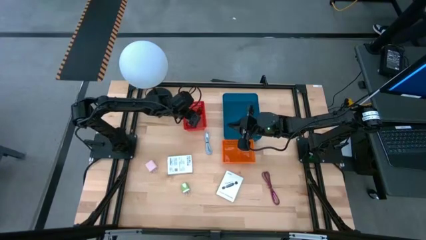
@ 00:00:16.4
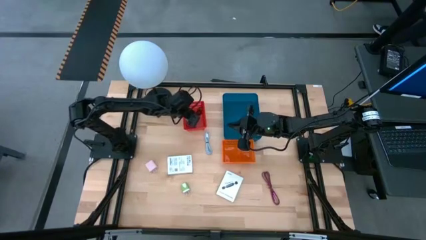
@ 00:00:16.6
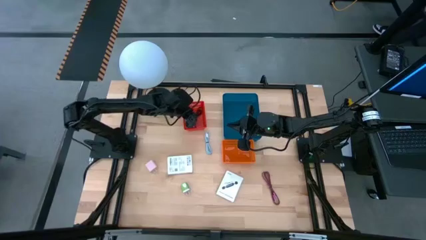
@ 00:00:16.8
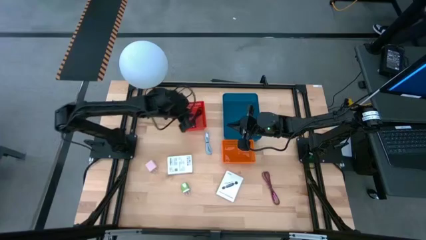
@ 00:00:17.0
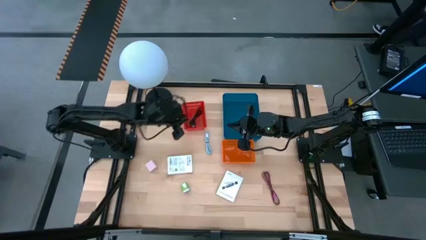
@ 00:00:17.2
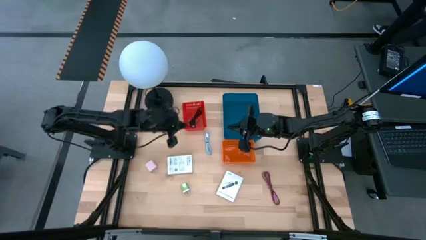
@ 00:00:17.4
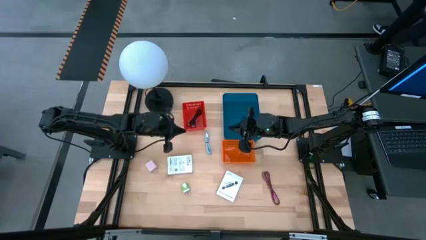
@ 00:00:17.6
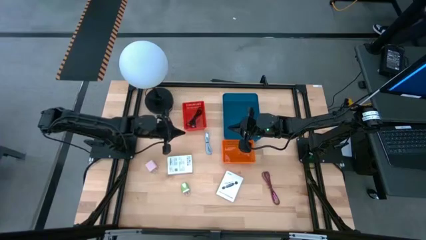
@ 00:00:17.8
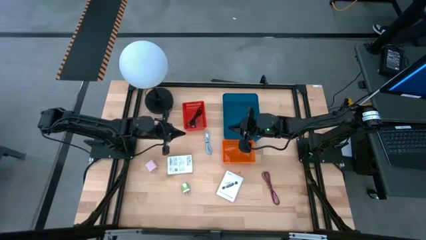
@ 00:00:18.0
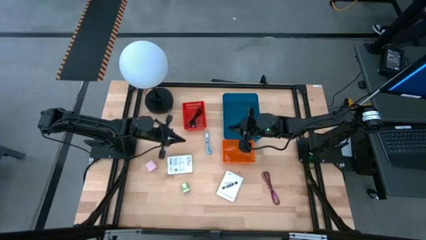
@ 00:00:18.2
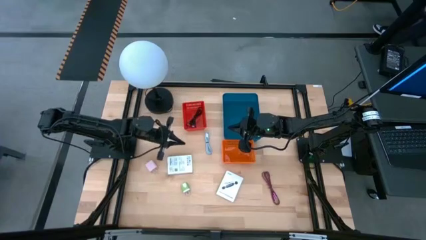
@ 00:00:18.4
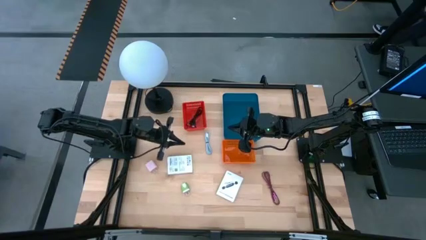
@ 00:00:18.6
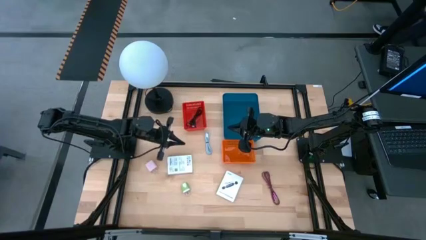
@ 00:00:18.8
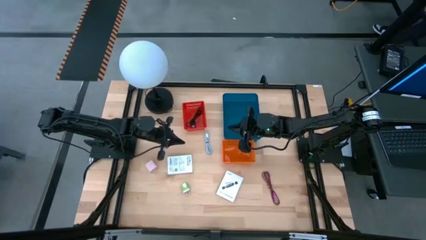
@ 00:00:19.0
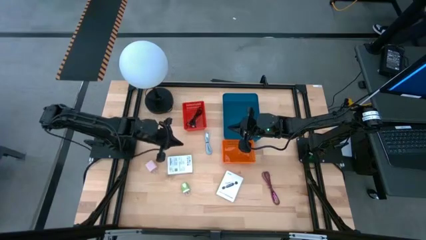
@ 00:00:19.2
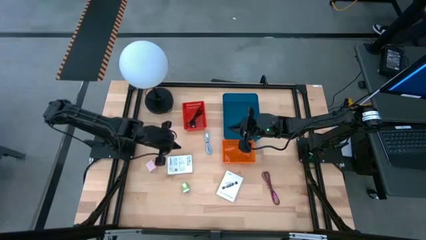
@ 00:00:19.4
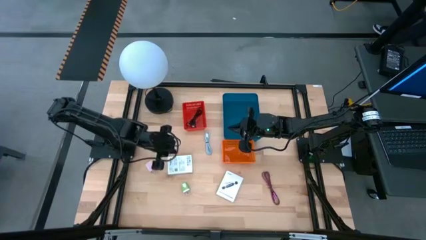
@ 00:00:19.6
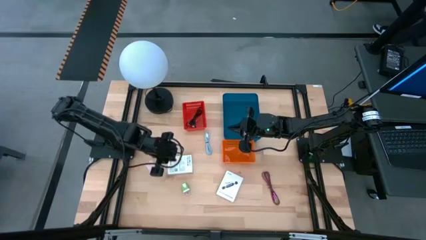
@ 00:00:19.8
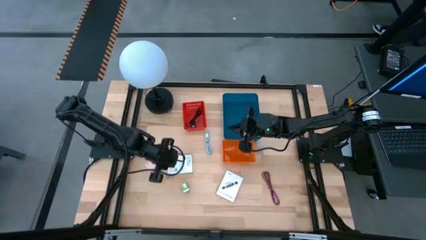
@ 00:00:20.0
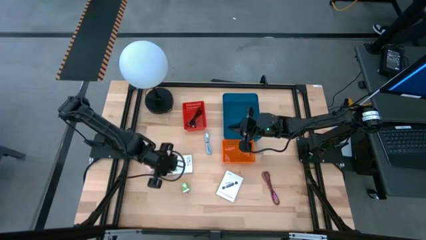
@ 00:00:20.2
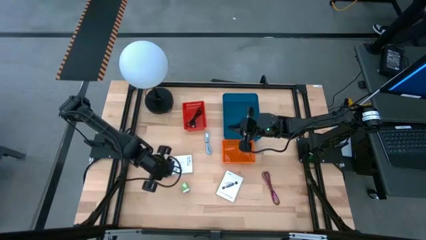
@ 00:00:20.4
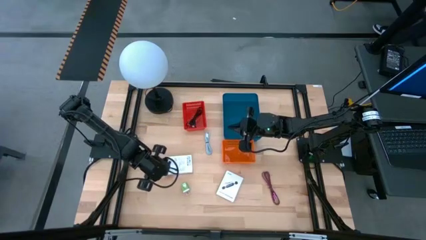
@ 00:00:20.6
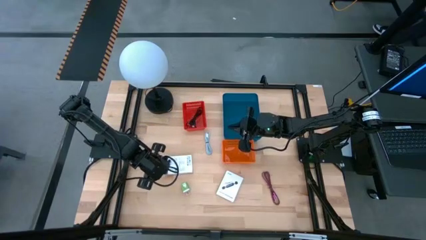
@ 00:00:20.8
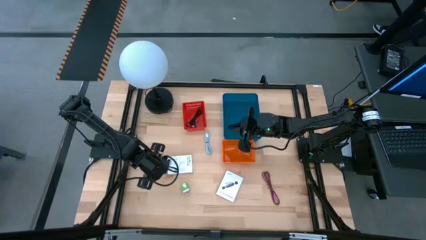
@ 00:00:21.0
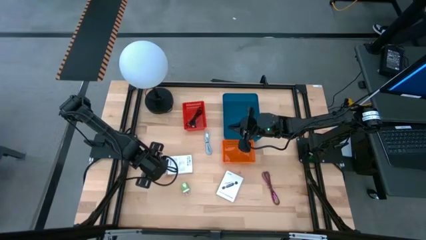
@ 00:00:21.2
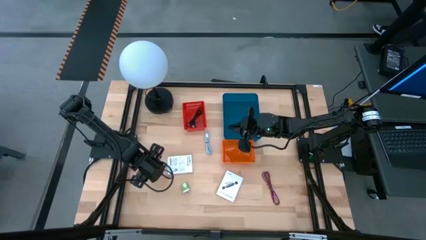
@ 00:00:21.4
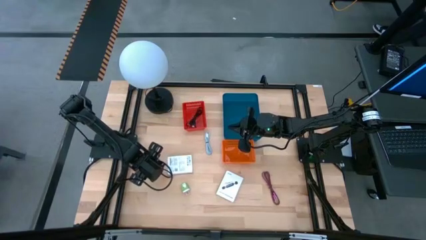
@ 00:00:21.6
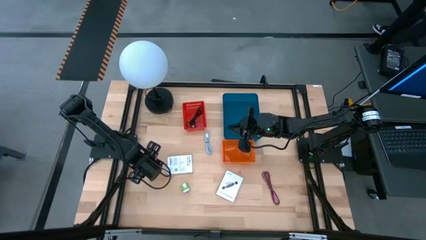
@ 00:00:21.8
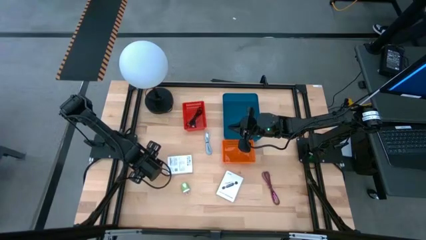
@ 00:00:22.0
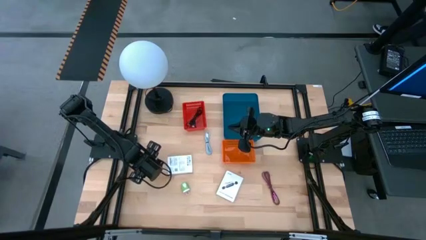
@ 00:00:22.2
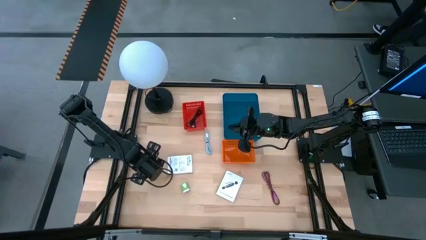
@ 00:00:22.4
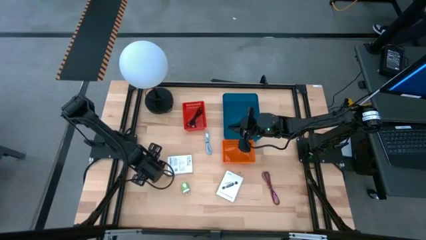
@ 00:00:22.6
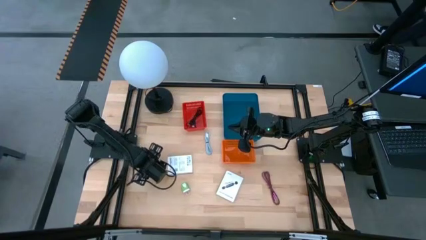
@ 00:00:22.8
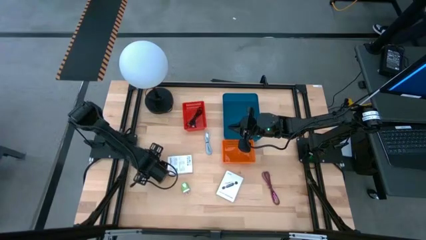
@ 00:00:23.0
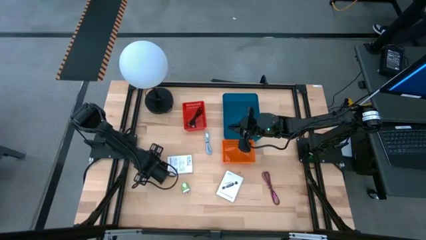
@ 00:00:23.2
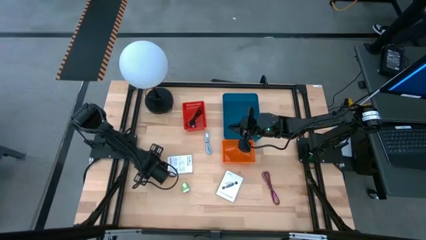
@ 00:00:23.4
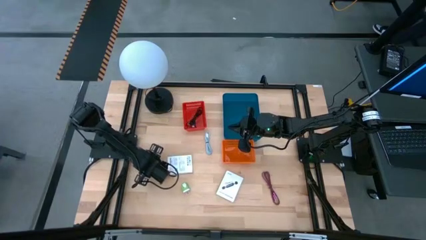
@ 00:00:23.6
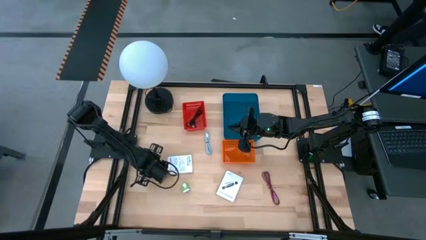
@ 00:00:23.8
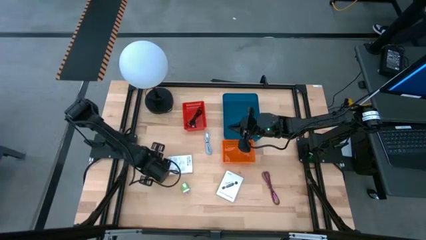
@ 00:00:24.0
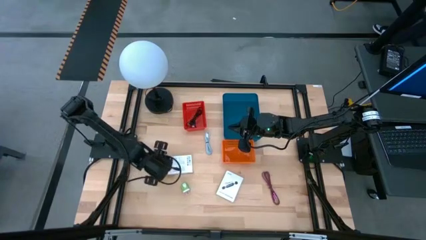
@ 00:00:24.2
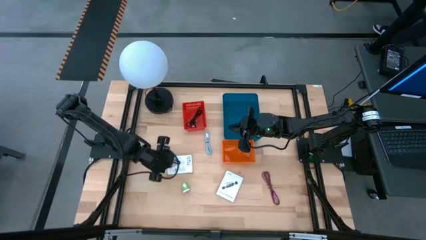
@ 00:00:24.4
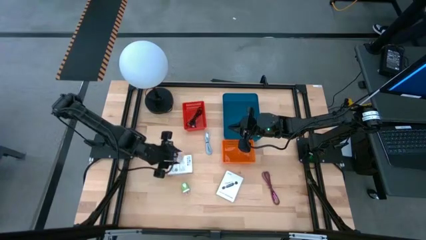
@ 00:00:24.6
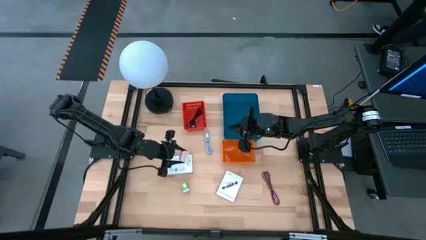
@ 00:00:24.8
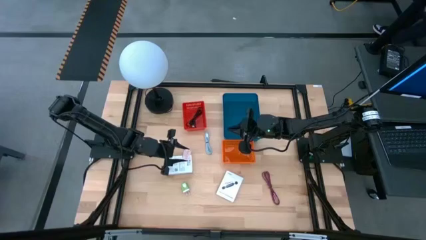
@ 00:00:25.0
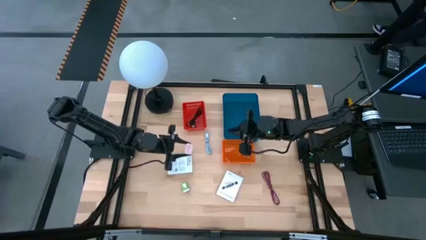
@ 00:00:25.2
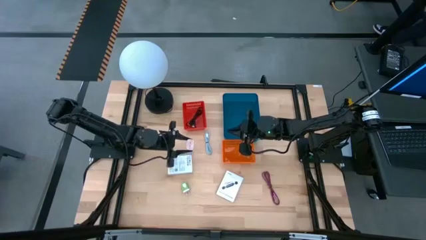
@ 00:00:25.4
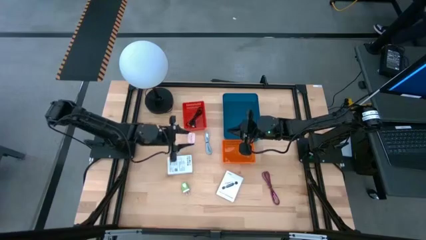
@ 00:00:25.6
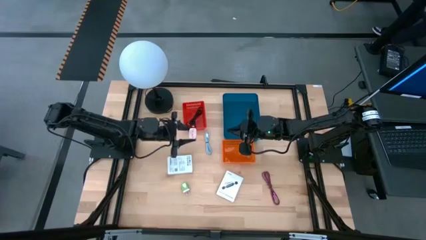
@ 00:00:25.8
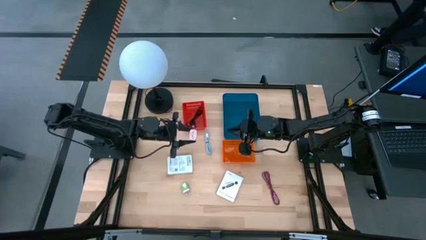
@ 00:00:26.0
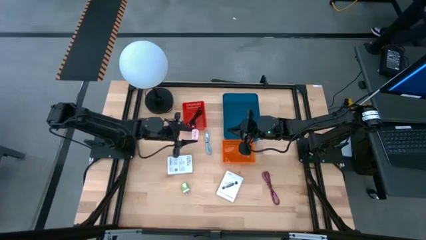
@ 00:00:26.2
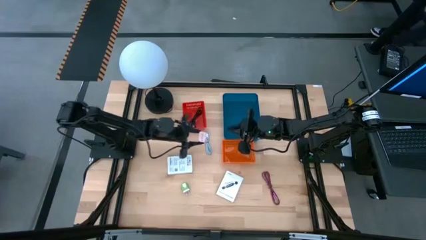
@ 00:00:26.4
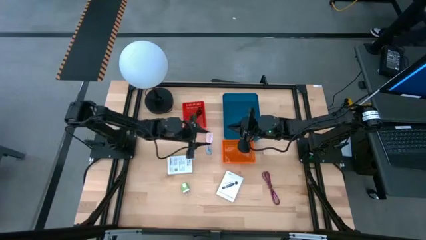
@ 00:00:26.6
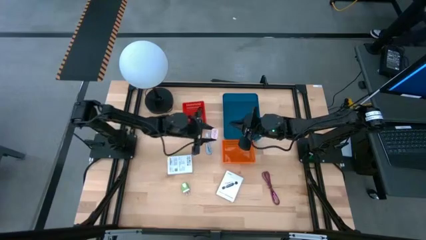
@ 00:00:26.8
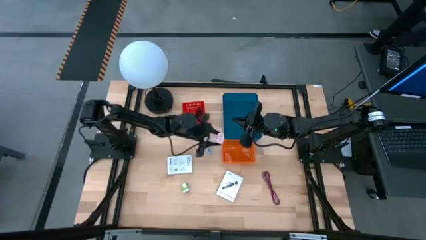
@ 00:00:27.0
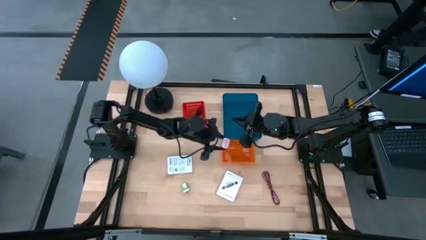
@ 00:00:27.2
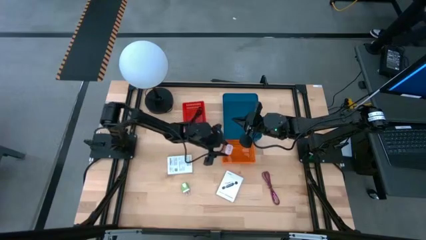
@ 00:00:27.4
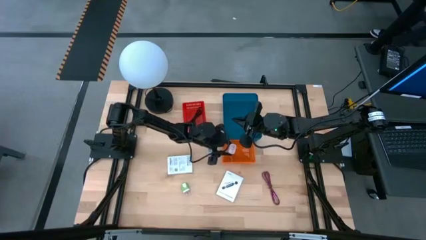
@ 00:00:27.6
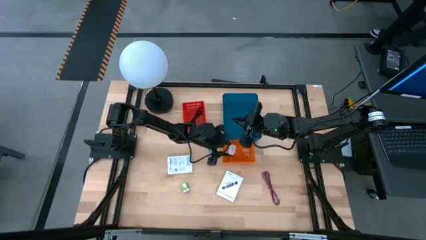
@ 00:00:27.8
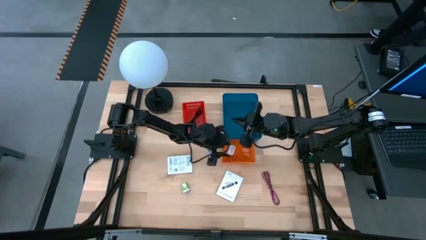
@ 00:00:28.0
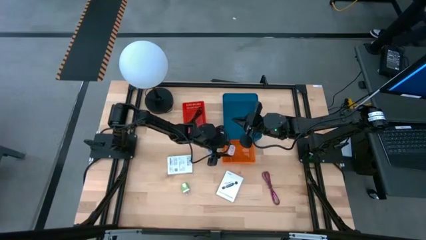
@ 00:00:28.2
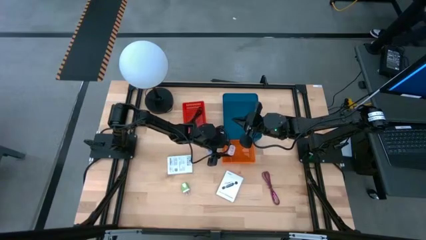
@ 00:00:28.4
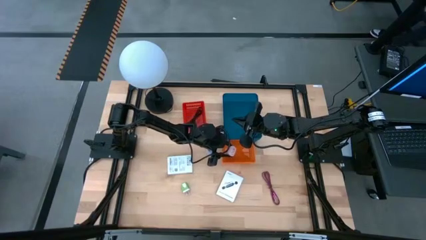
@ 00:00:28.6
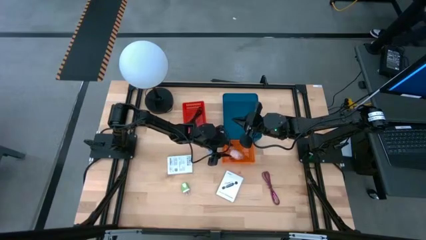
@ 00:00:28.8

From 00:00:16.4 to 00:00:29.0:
Task: Pick and place items into bin
Put the light pink charger adapter into the orange bin
